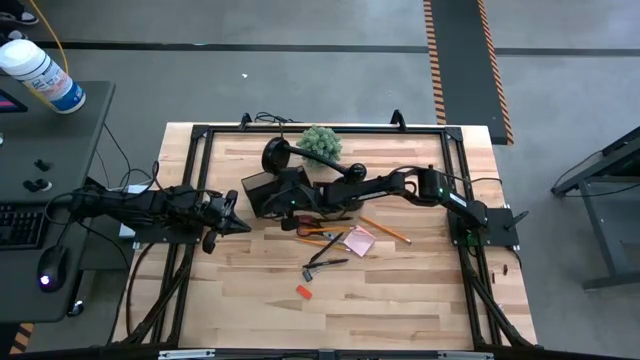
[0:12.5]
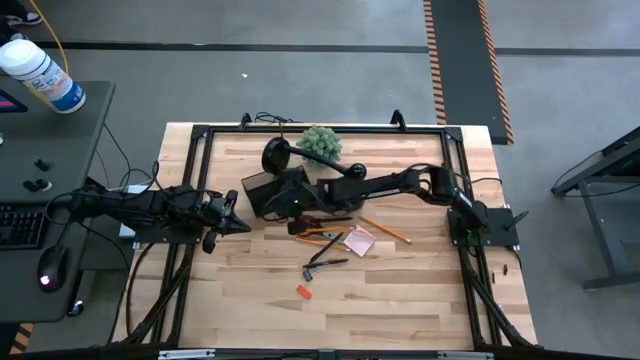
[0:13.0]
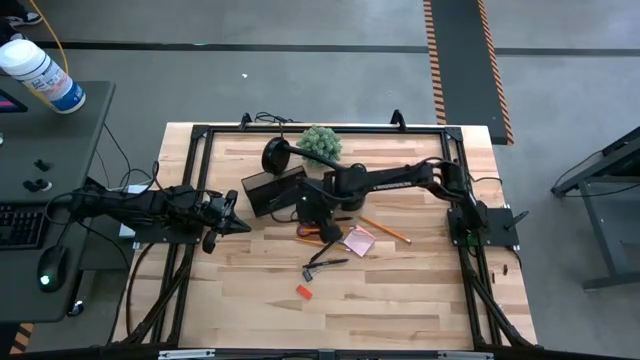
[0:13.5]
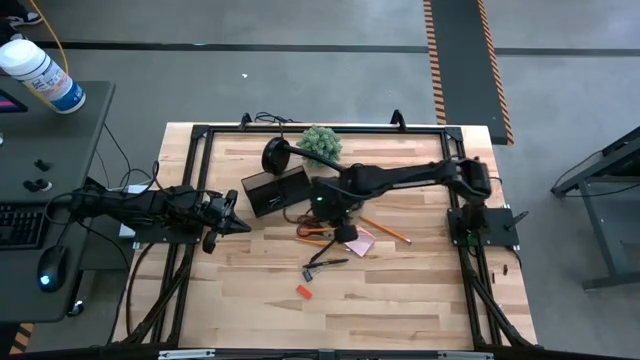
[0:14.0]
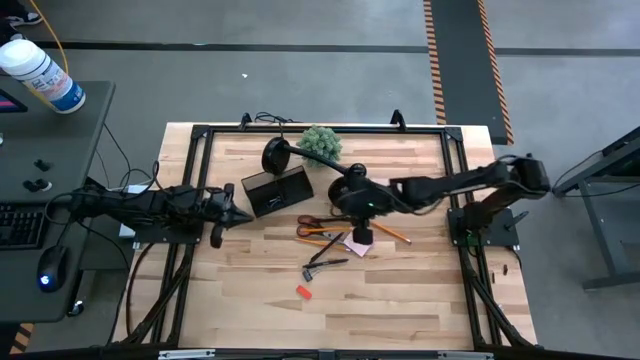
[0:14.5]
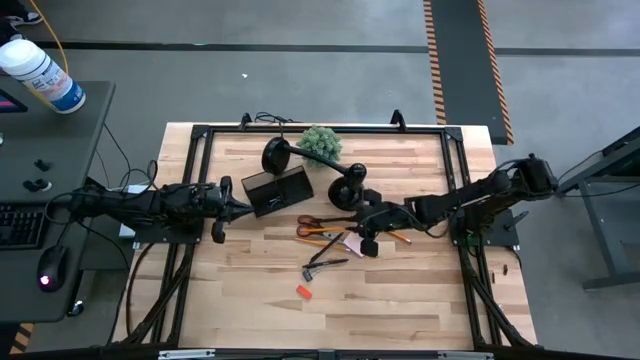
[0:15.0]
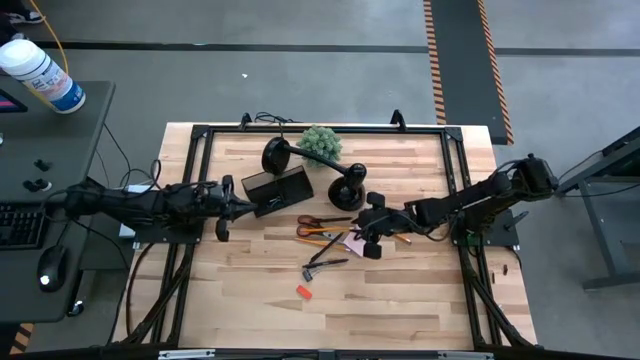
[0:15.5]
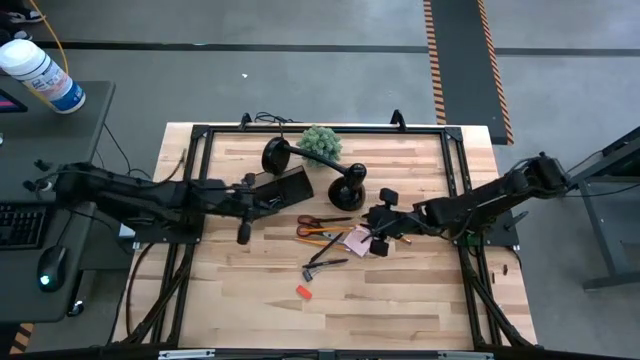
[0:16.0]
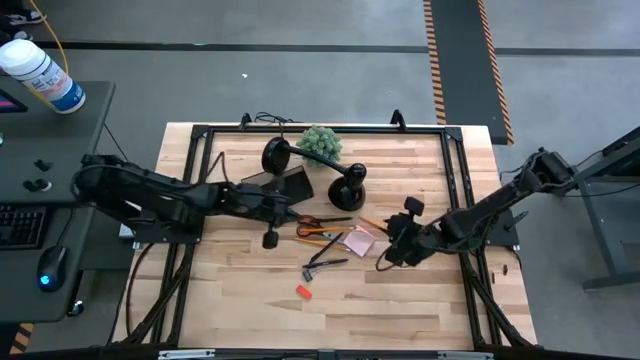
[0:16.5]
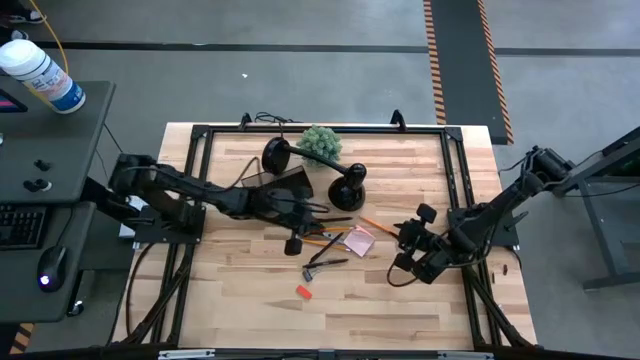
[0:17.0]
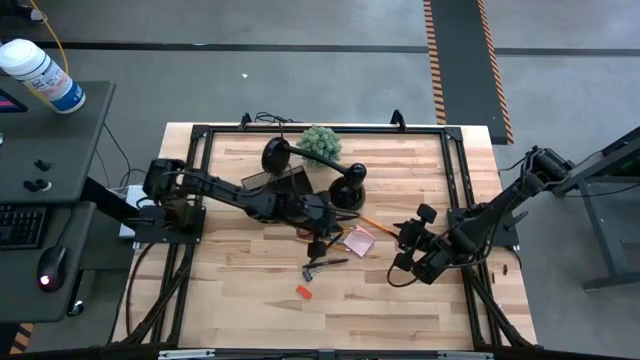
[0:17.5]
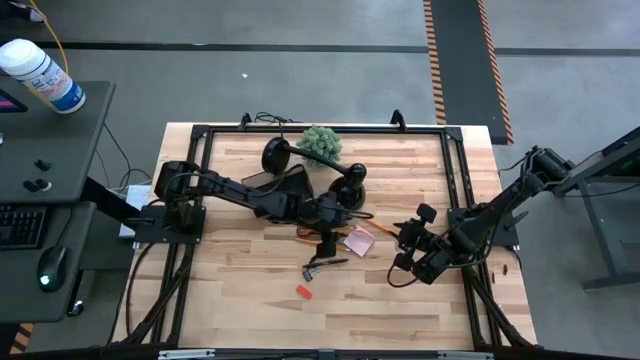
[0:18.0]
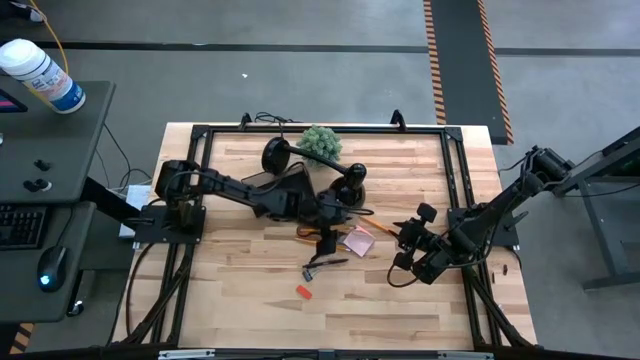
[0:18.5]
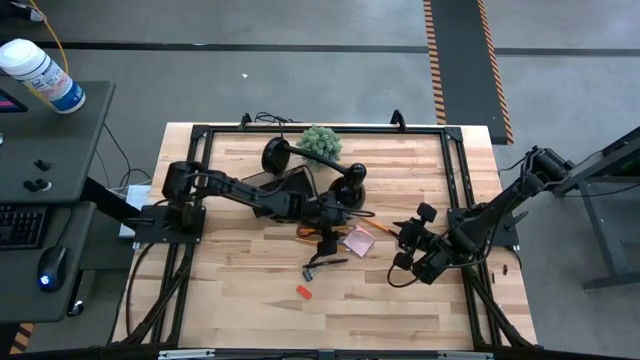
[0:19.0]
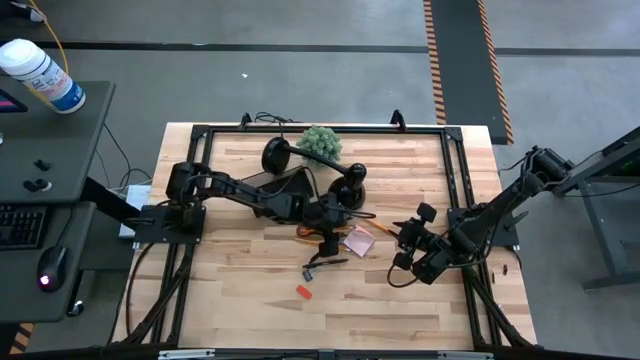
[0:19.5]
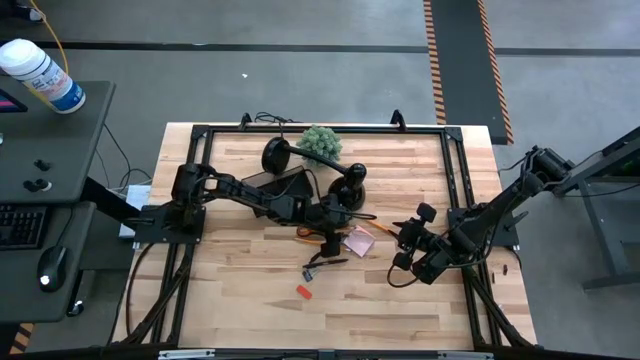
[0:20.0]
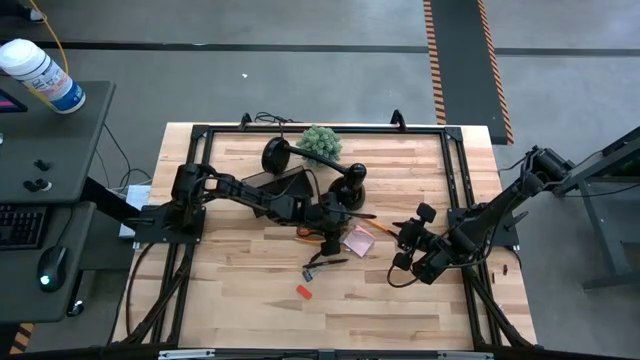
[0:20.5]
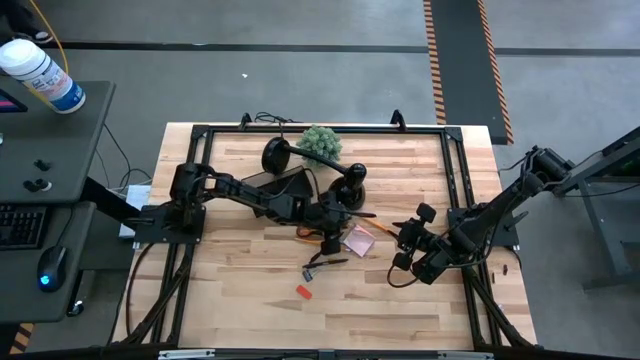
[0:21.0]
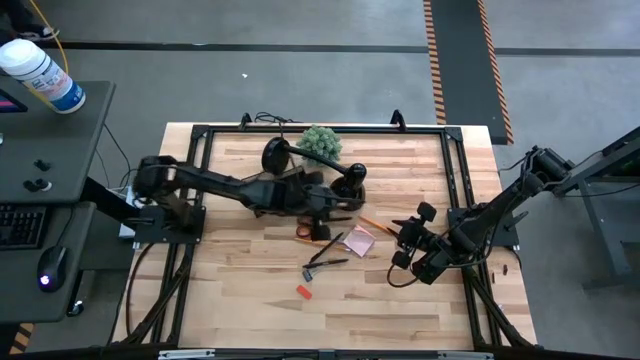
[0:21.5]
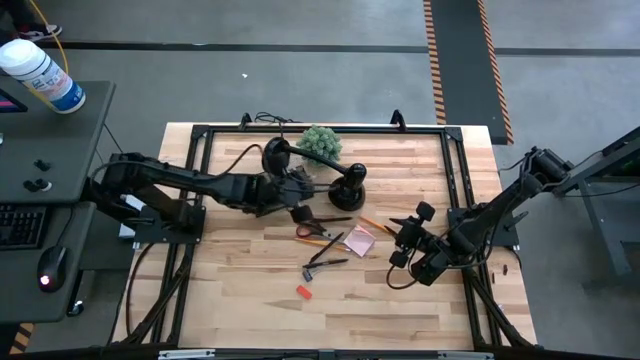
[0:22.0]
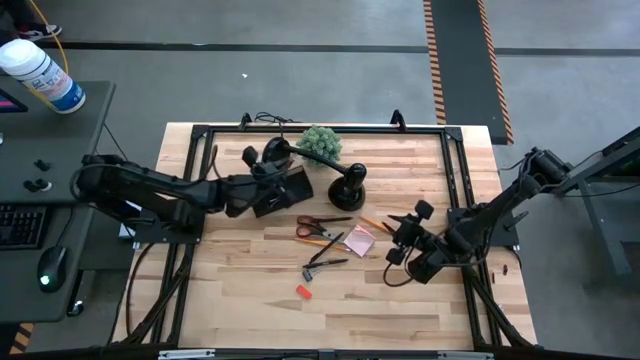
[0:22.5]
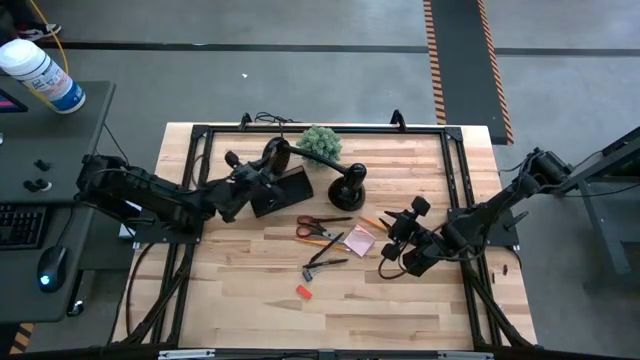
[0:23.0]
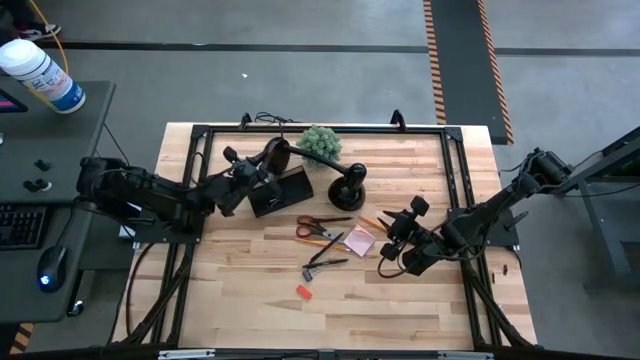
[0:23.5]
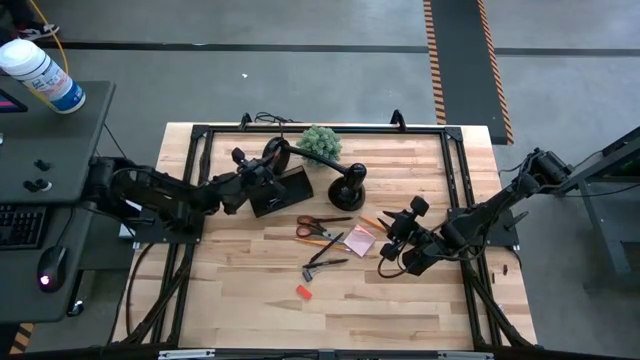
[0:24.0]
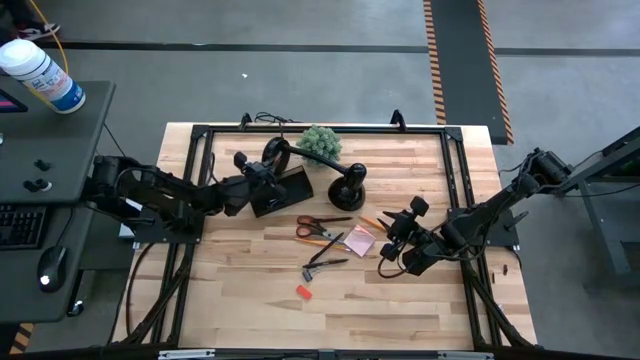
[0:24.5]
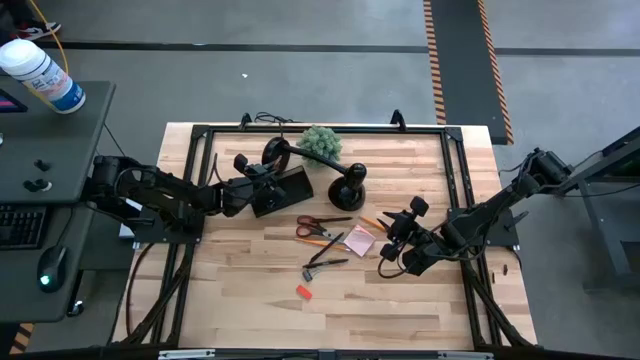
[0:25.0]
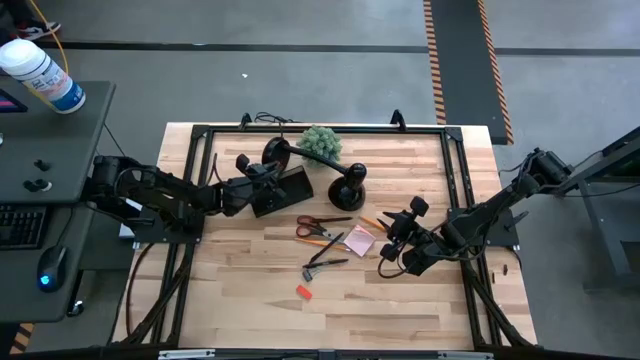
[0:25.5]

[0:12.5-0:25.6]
Task: Pick and place office supplies into organizer
Put the top left orange pencil into the black desk organizer

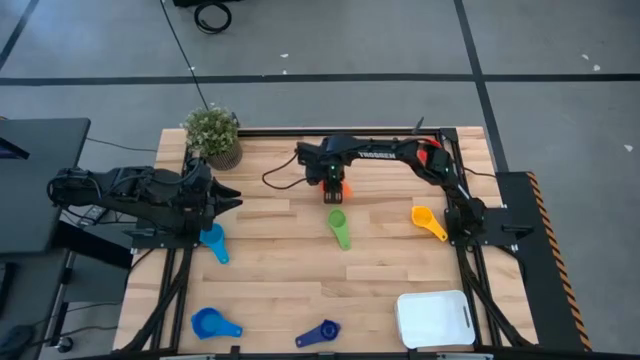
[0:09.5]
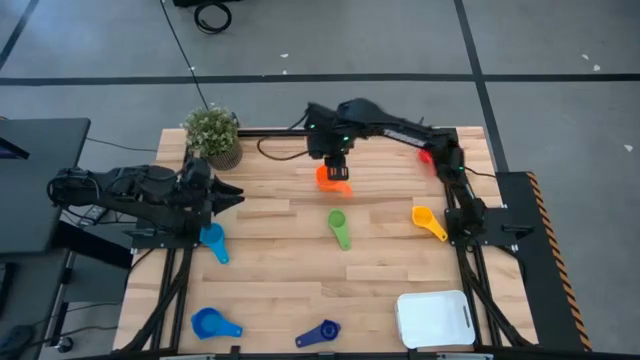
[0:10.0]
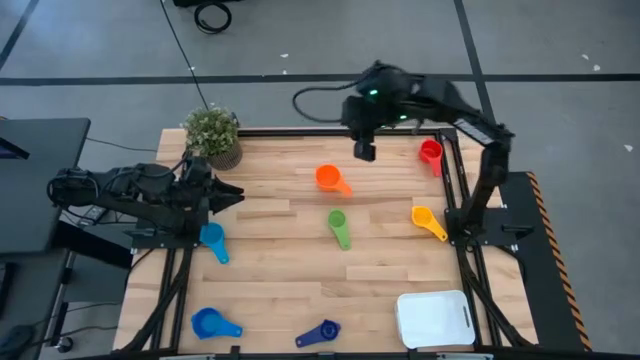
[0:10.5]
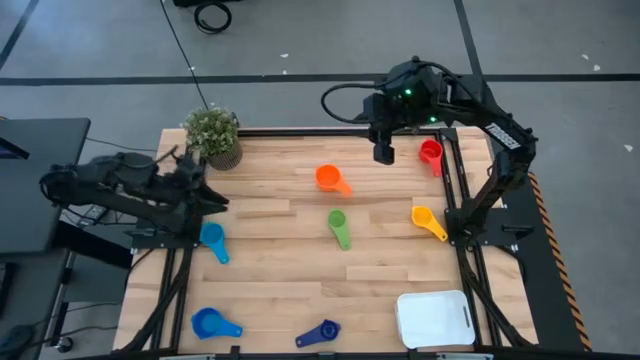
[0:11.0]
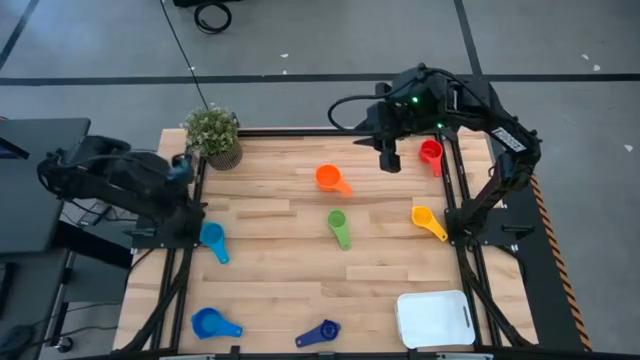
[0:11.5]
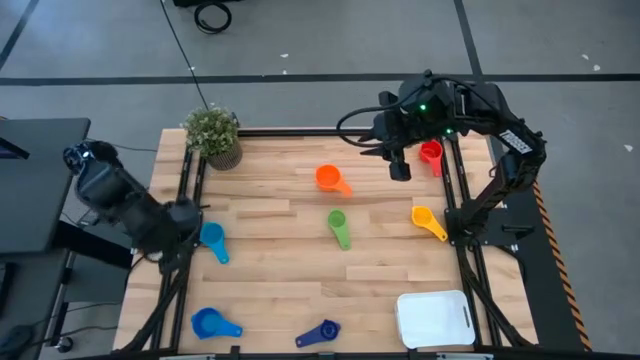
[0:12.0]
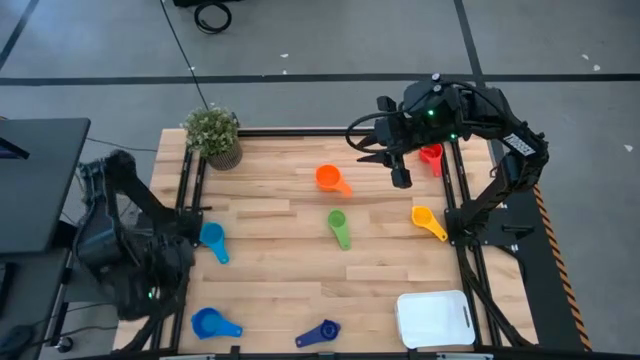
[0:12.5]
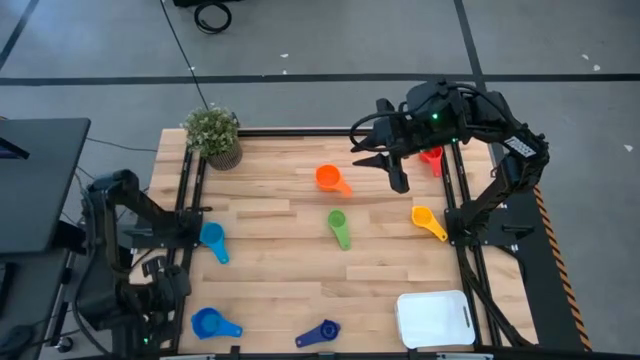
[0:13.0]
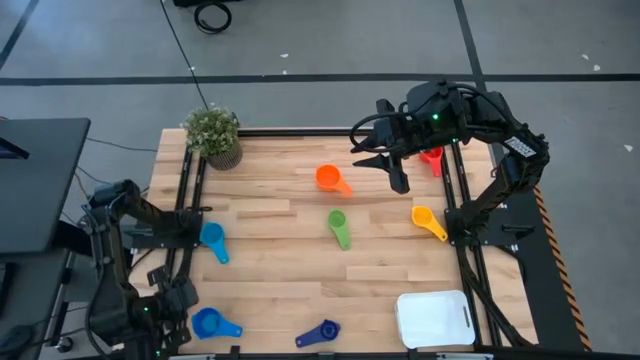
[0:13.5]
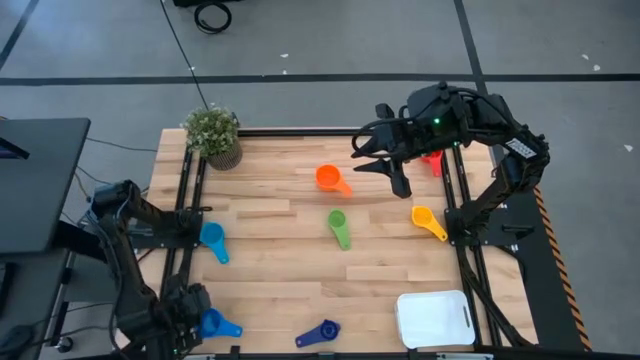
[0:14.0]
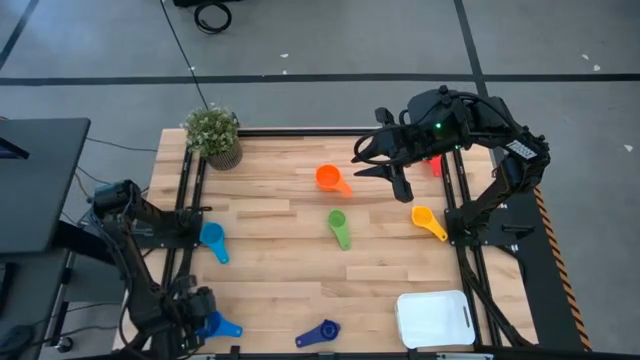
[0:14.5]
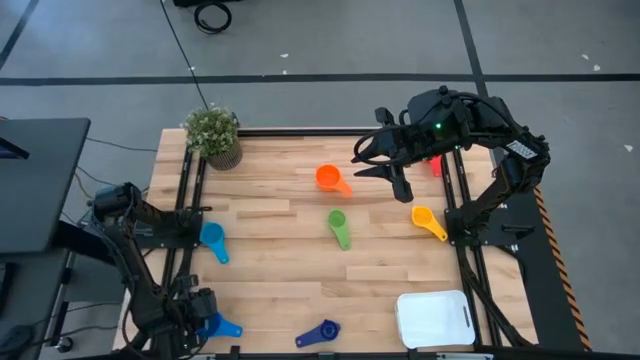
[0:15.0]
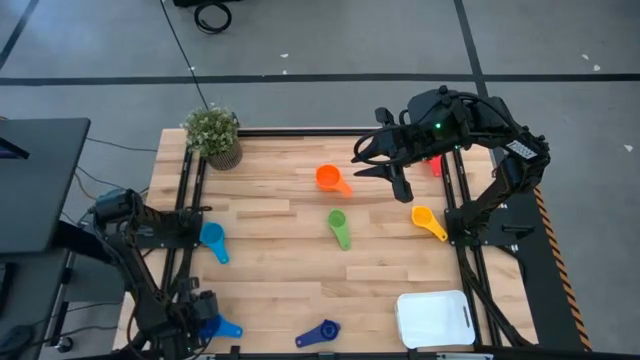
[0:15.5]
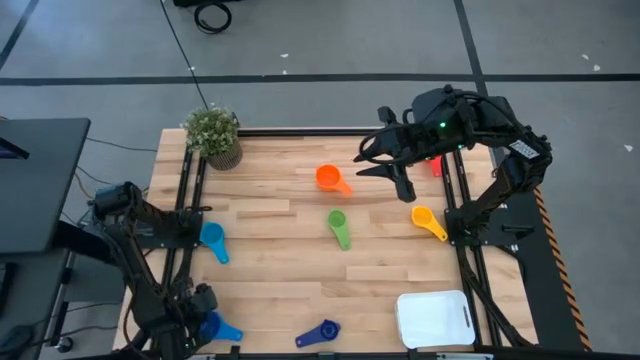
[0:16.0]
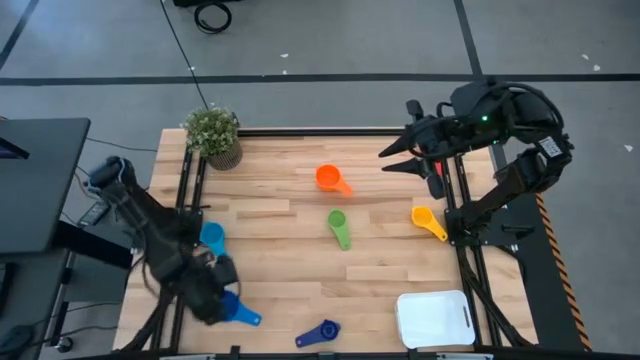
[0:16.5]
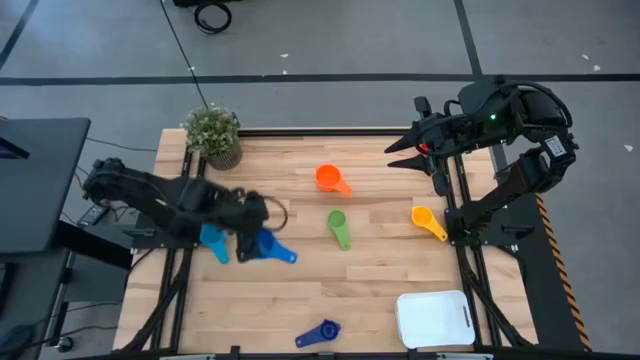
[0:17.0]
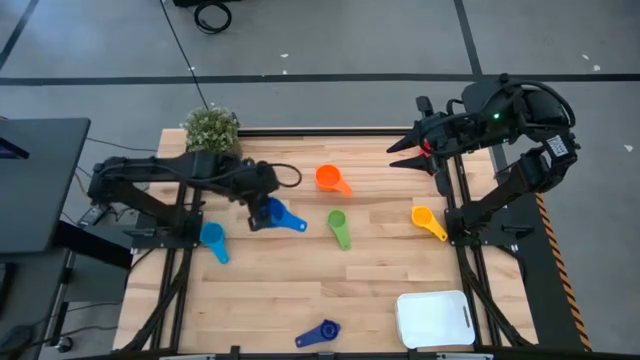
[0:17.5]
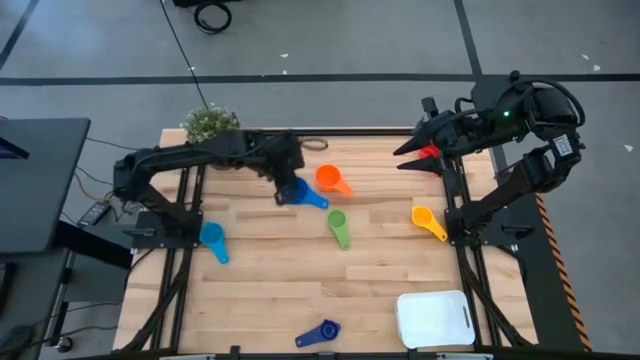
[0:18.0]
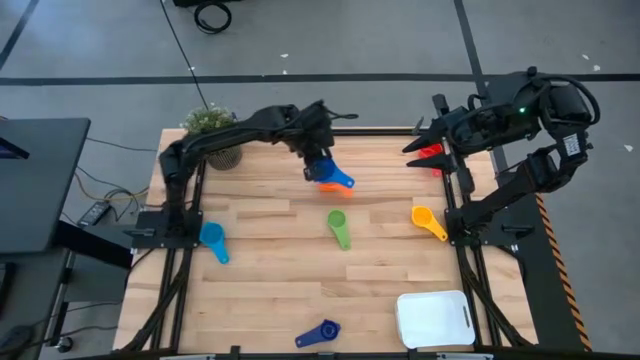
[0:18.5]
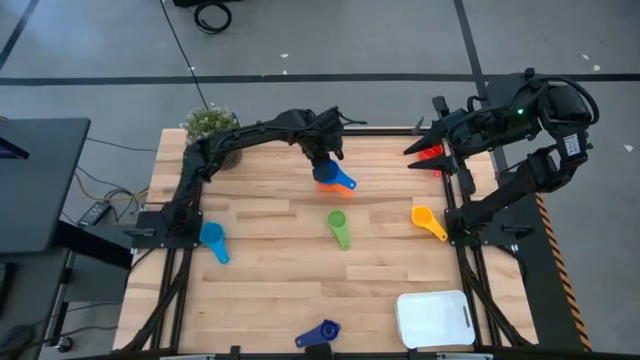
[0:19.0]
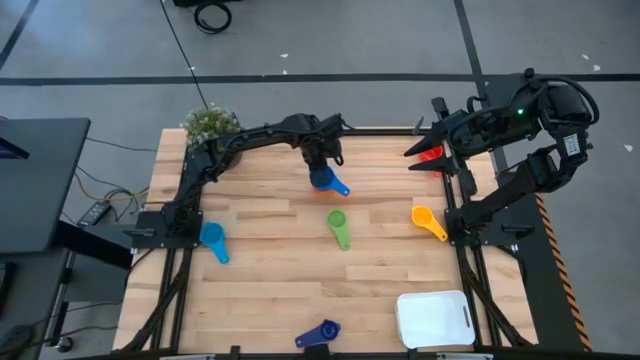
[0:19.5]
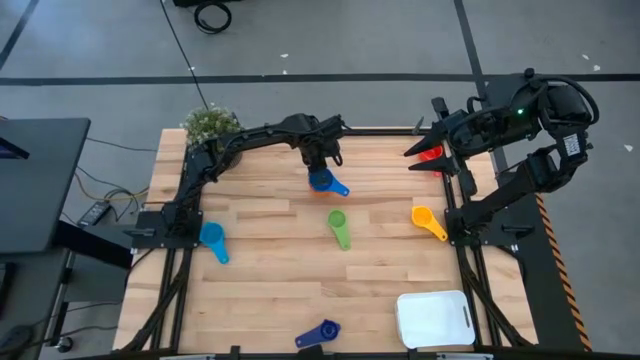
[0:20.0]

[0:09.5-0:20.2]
Task: Nest measuring cups in basket
Stack the blue measuring cup on top of the orange measuring cup
